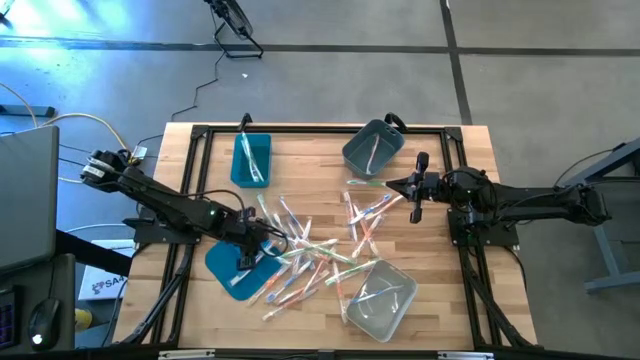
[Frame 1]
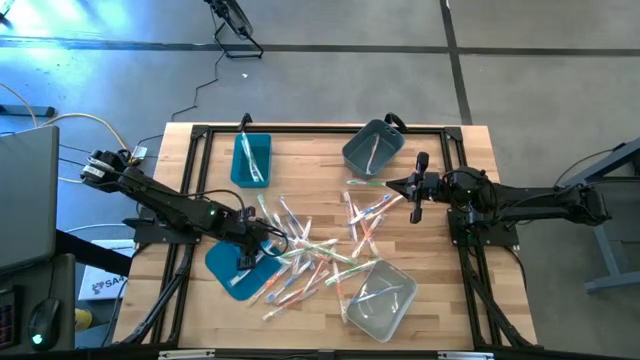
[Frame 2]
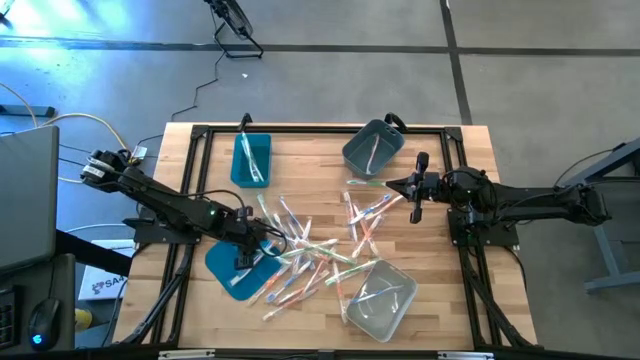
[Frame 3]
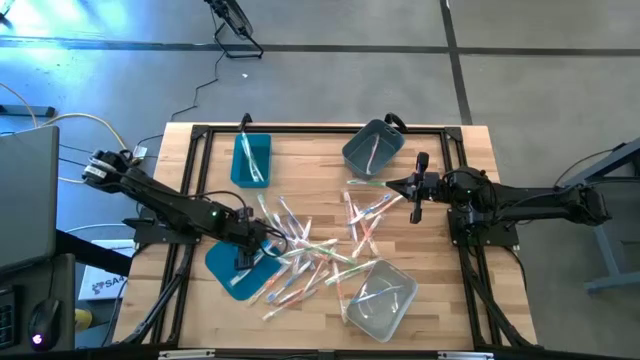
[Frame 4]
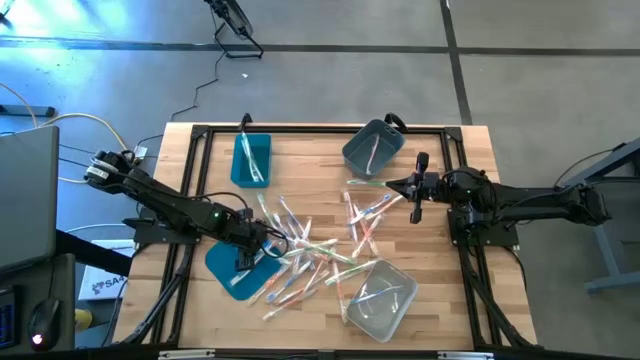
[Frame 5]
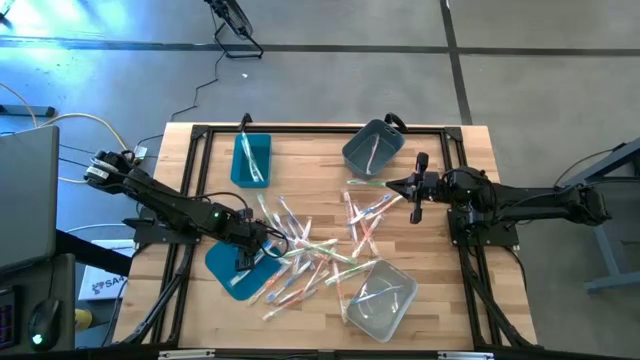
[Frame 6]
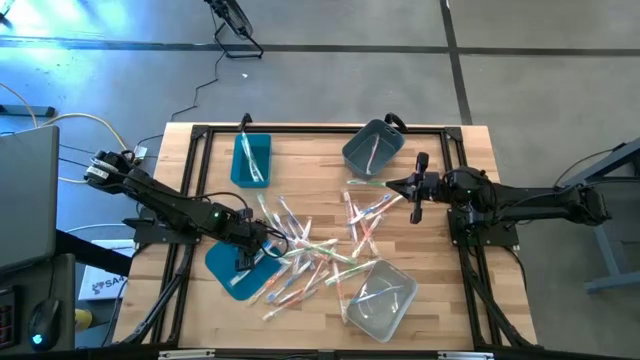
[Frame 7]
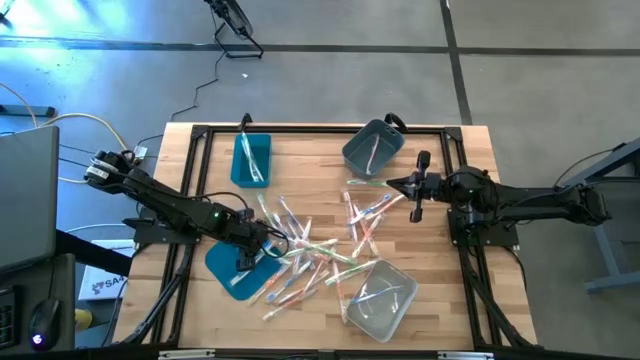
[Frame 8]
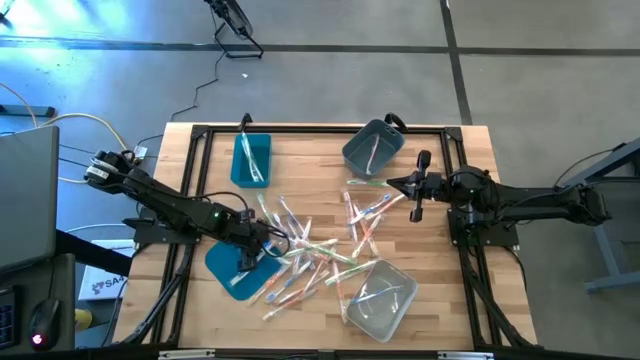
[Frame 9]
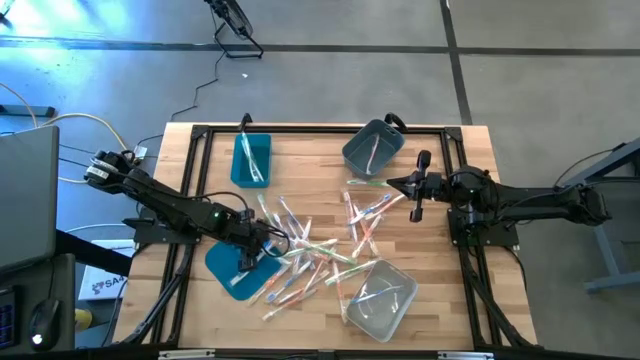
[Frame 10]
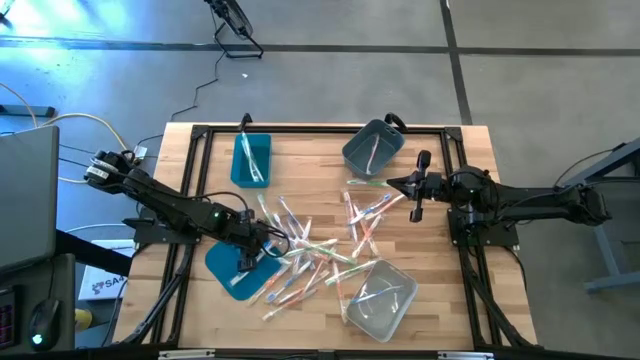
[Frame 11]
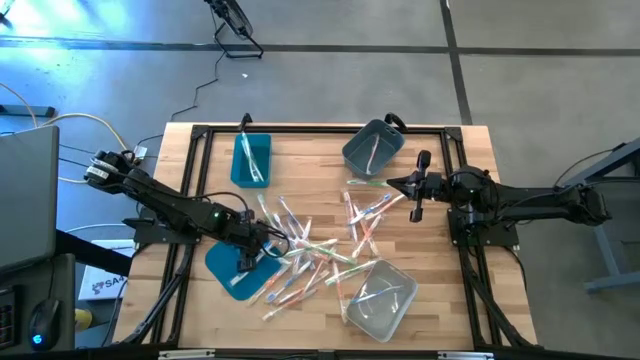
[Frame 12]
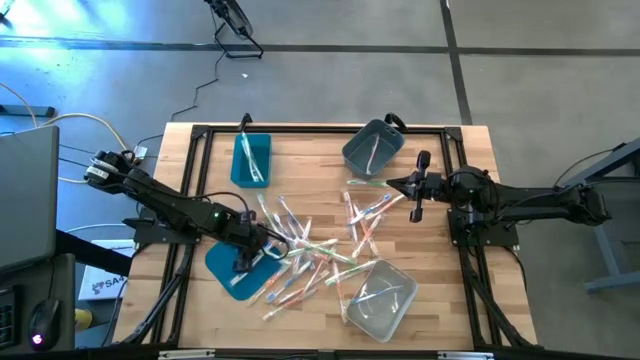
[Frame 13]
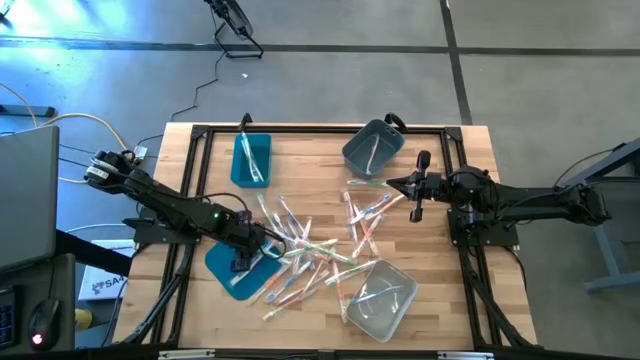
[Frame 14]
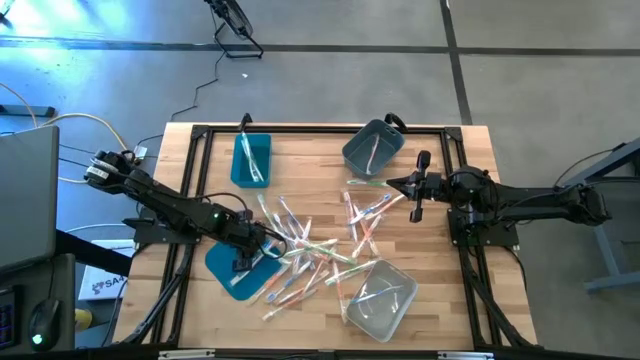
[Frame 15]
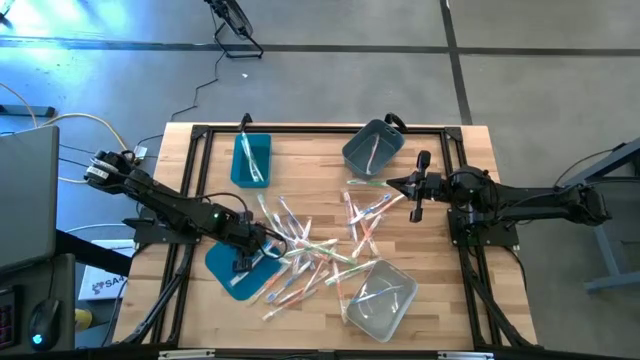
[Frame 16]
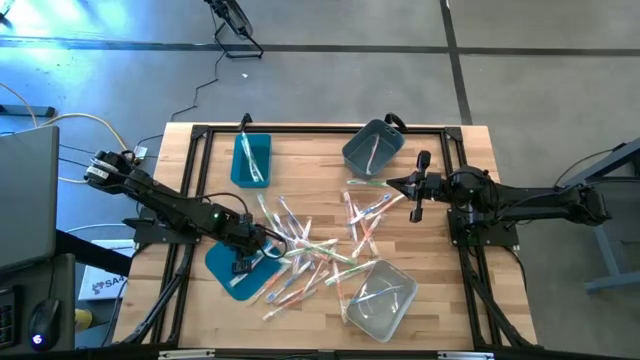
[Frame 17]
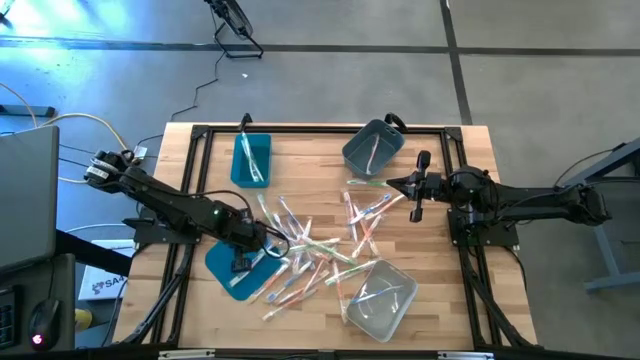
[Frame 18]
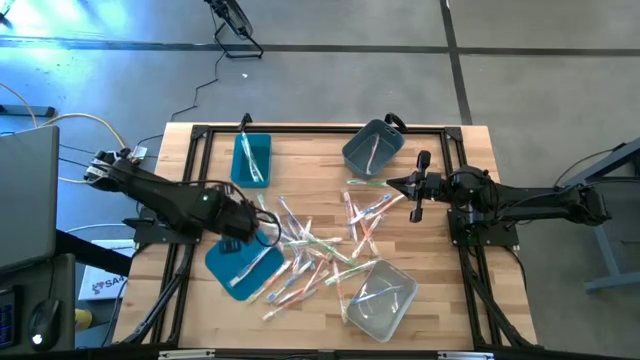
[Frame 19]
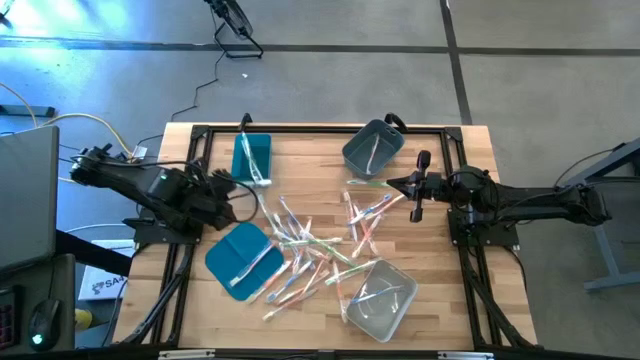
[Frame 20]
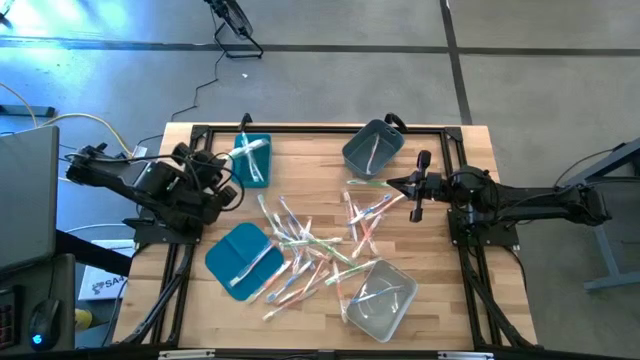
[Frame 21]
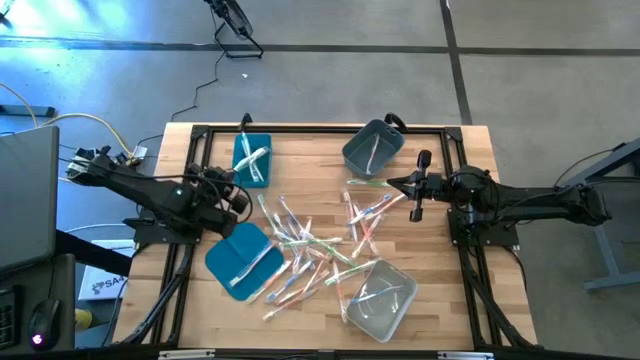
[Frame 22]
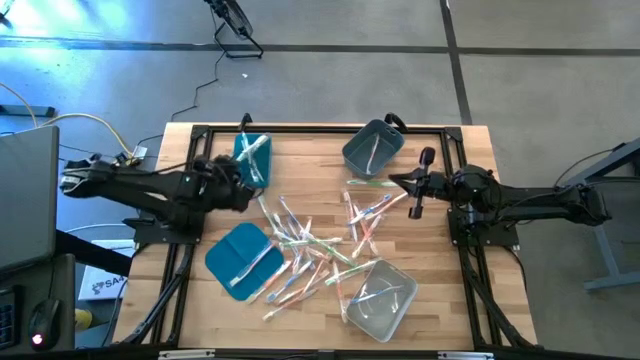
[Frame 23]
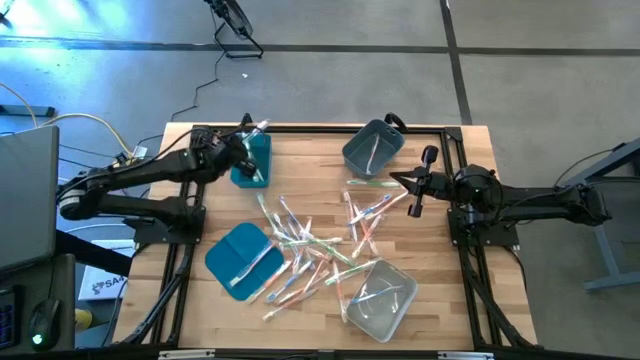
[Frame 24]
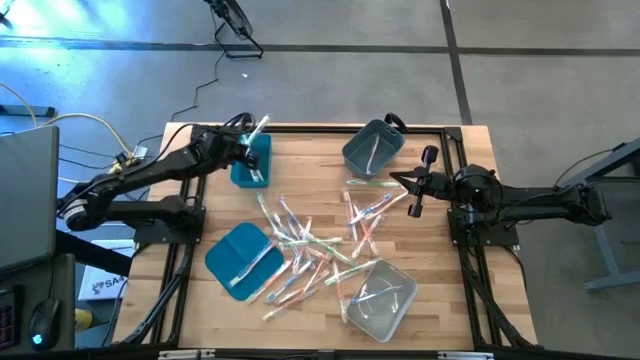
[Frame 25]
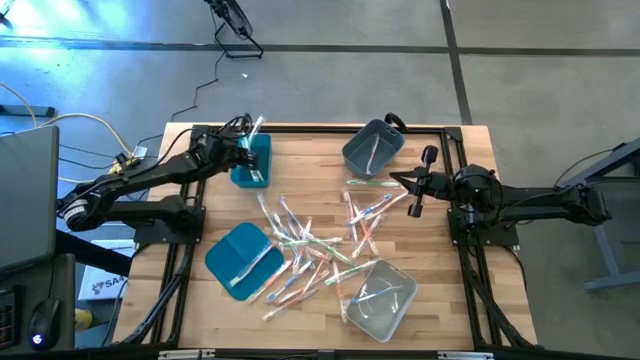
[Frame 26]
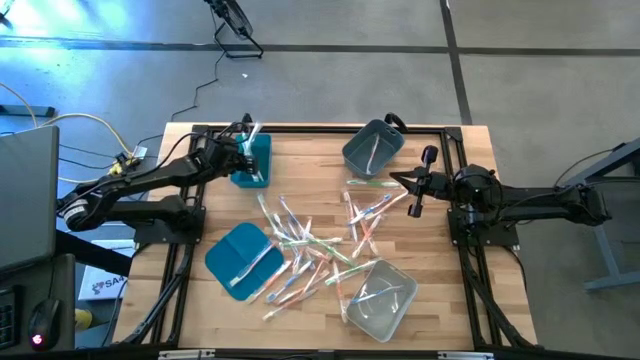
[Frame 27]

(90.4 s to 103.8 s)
Task: Pick & Place Toothbrushes
Put the green toothbrush into the blue bin
